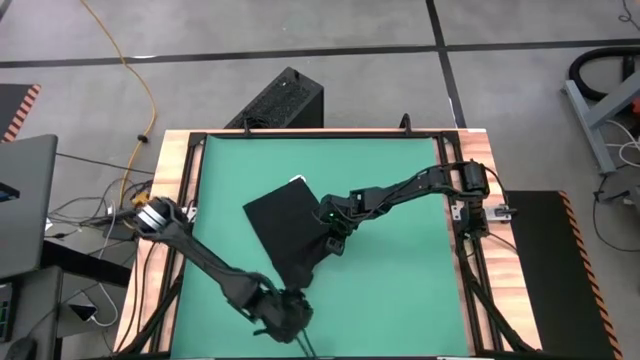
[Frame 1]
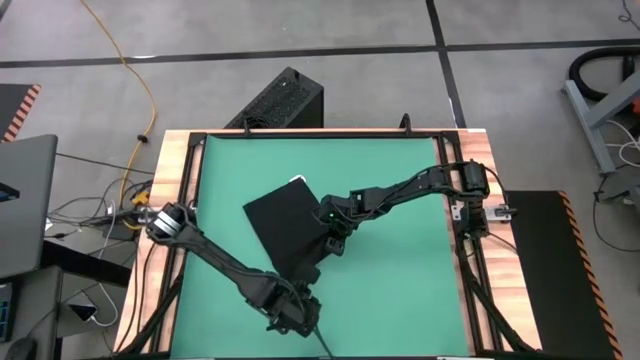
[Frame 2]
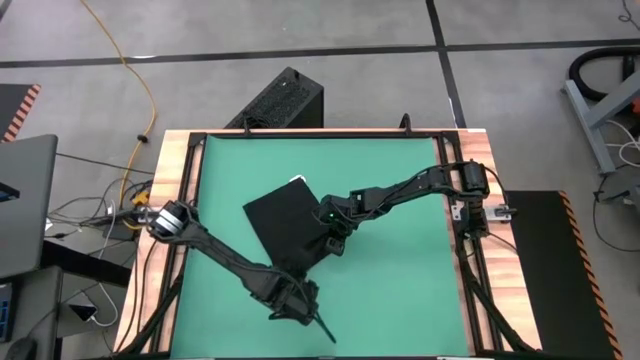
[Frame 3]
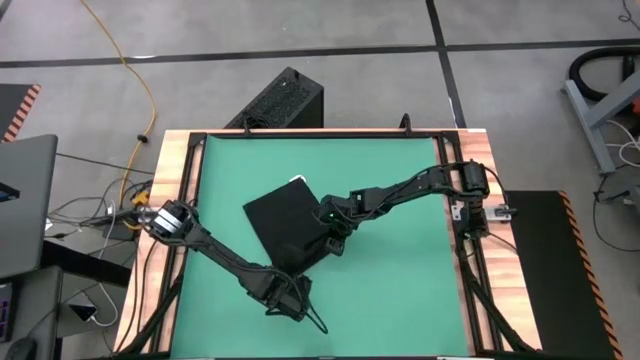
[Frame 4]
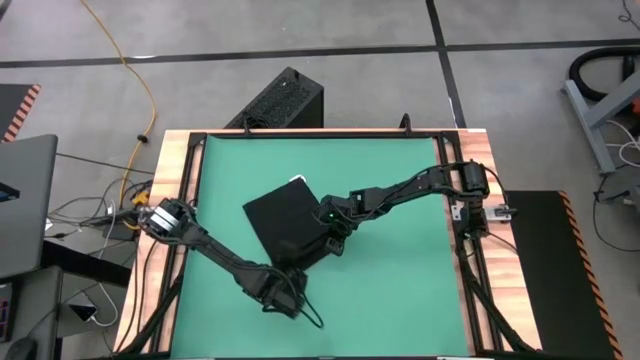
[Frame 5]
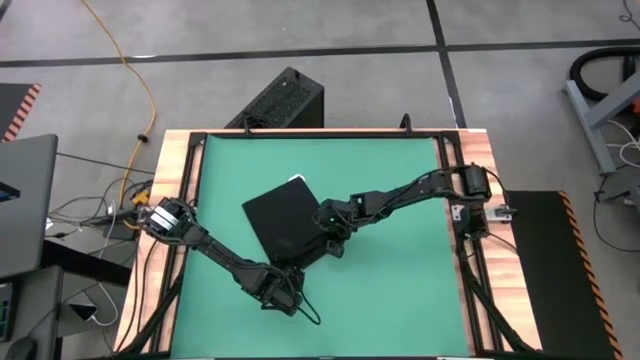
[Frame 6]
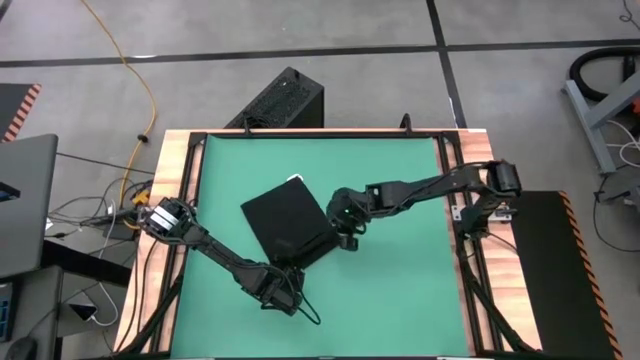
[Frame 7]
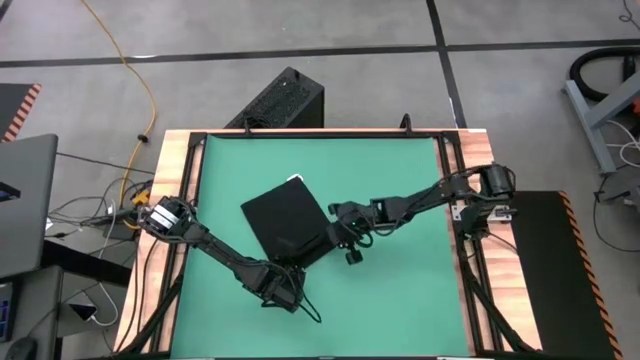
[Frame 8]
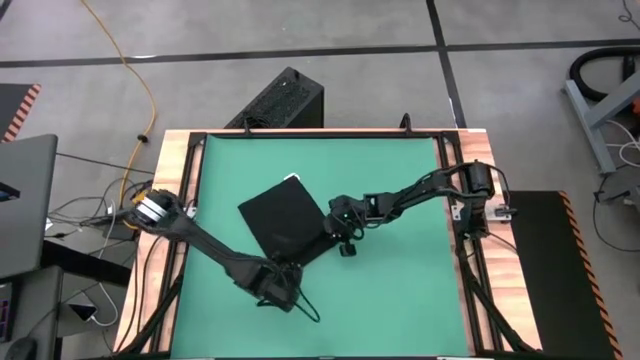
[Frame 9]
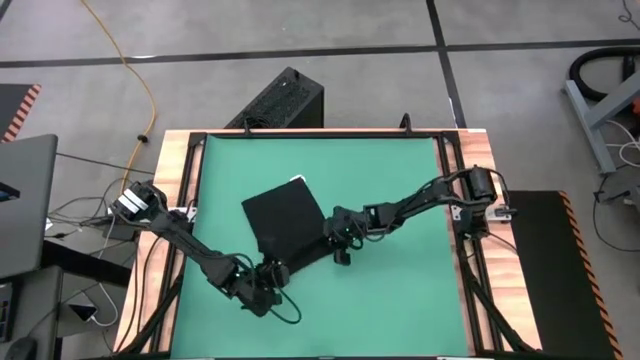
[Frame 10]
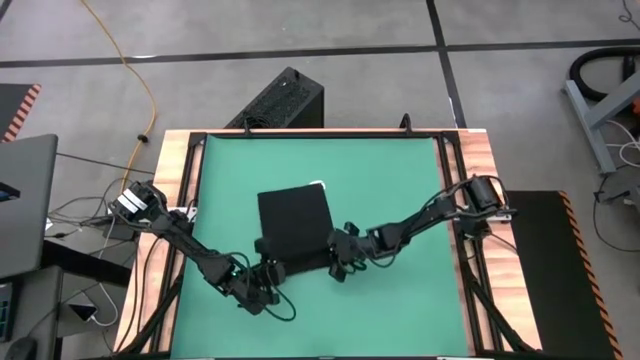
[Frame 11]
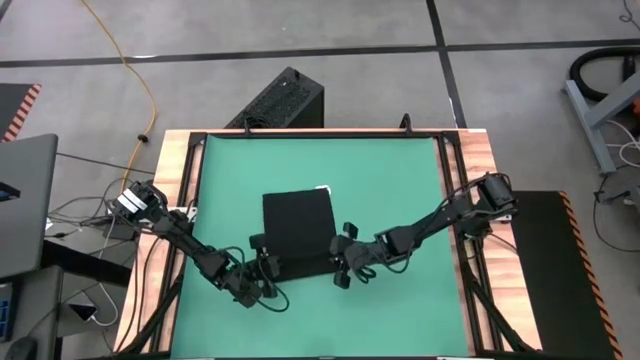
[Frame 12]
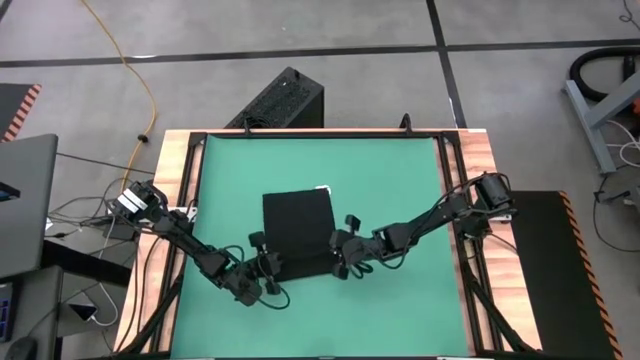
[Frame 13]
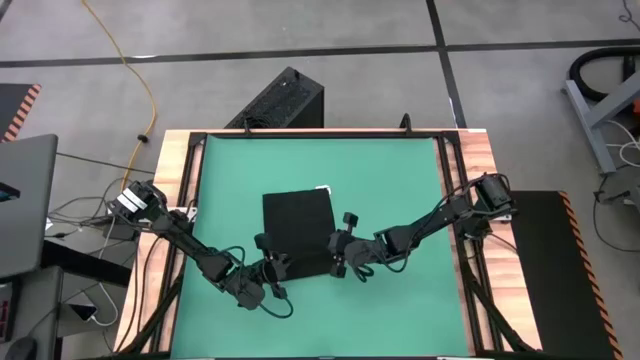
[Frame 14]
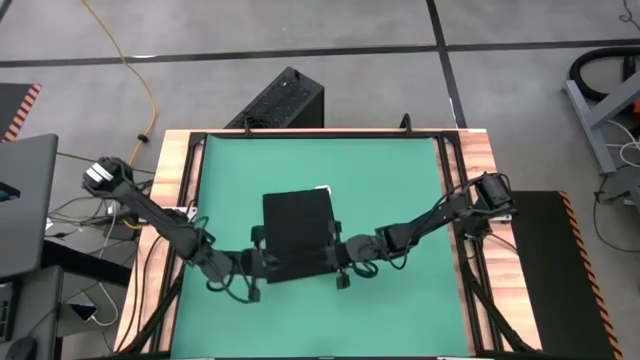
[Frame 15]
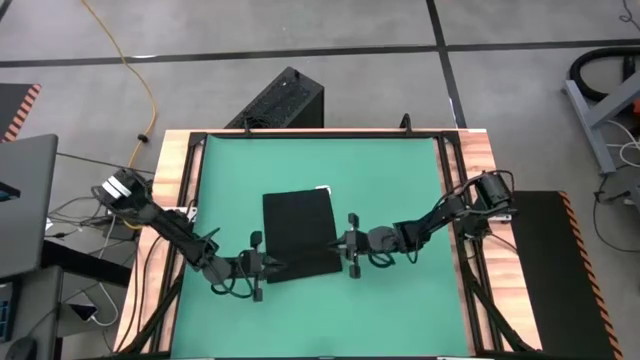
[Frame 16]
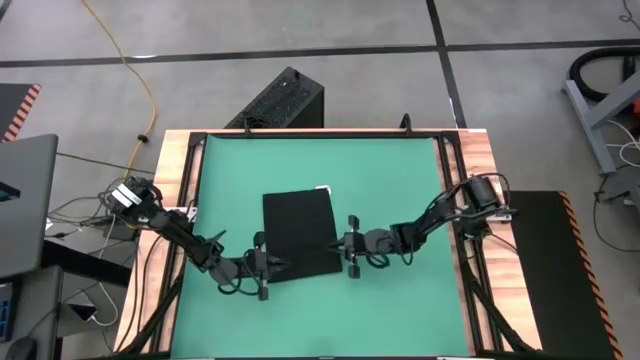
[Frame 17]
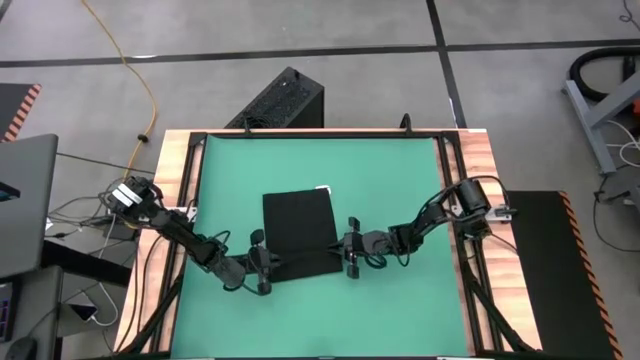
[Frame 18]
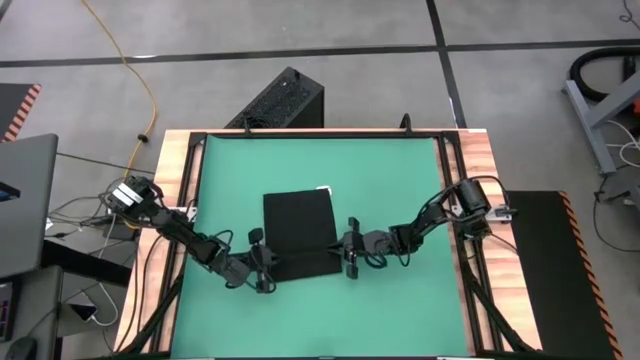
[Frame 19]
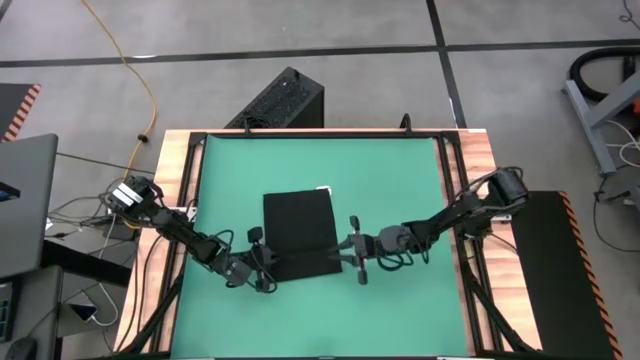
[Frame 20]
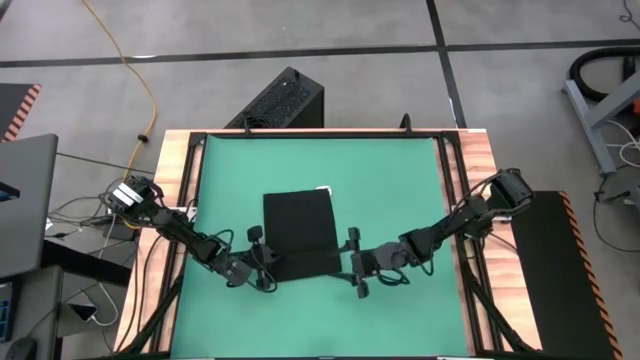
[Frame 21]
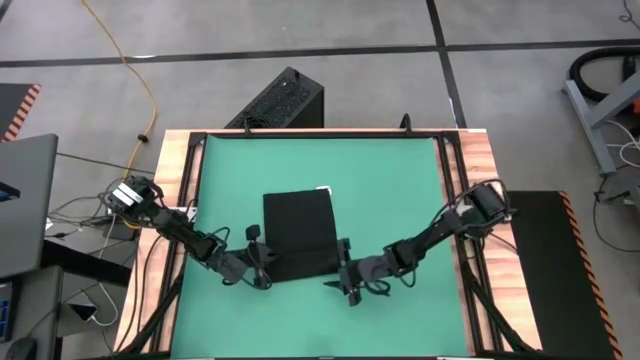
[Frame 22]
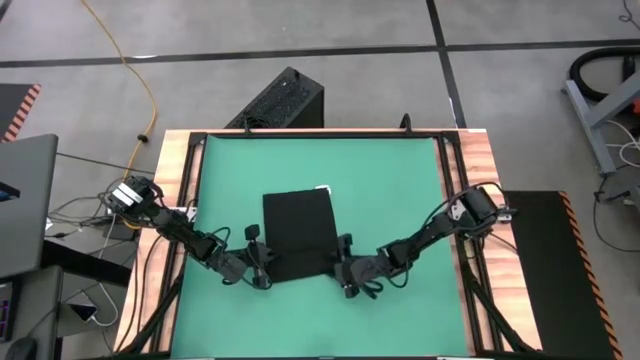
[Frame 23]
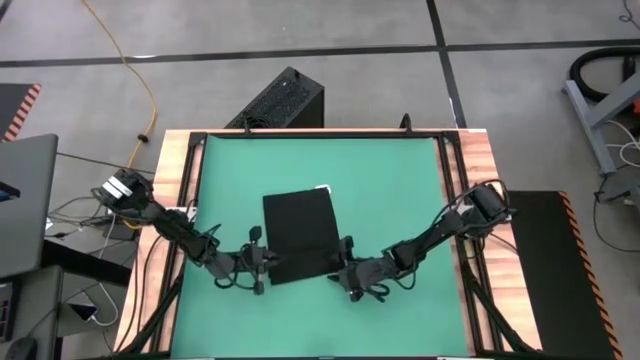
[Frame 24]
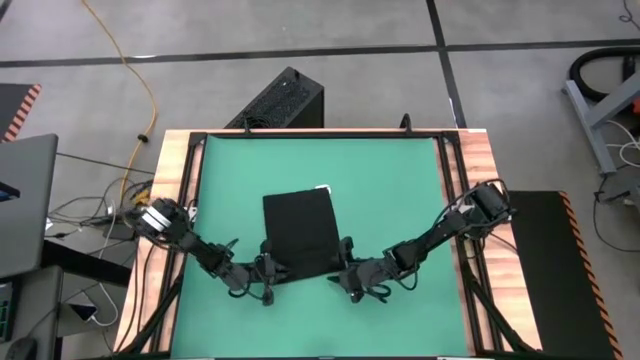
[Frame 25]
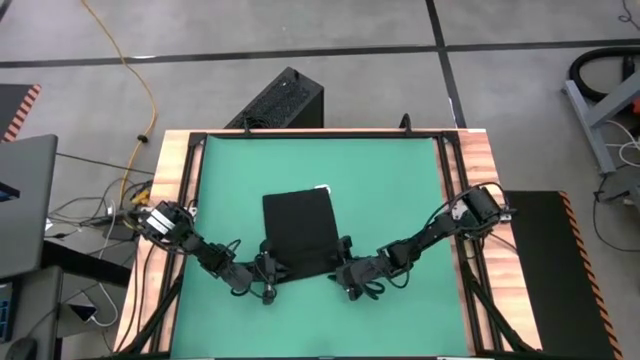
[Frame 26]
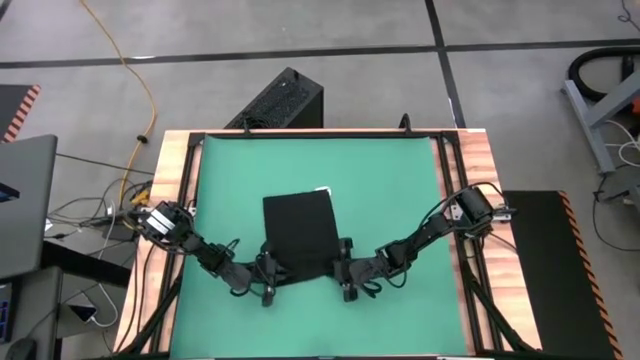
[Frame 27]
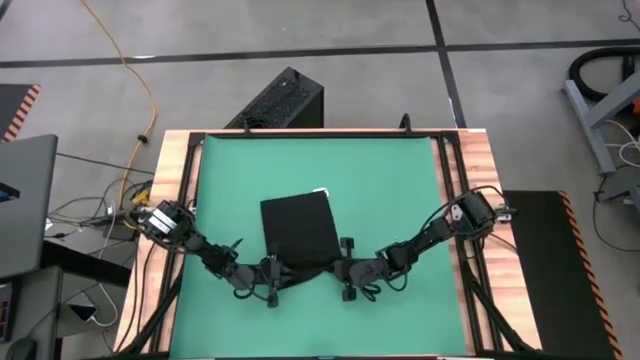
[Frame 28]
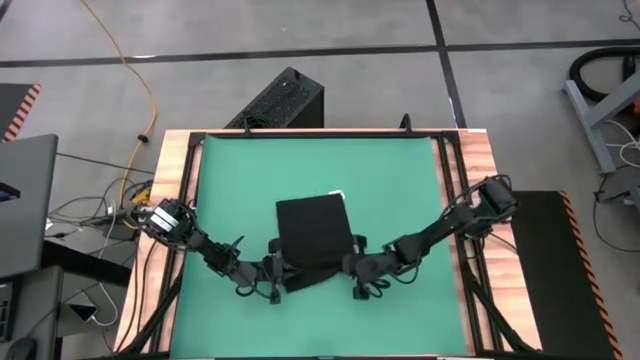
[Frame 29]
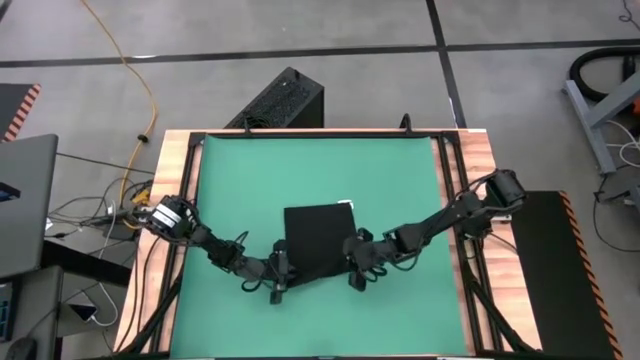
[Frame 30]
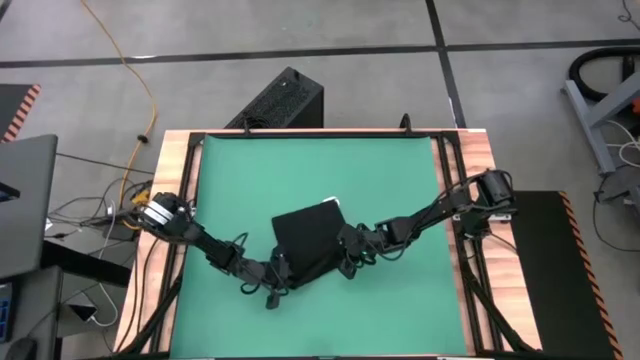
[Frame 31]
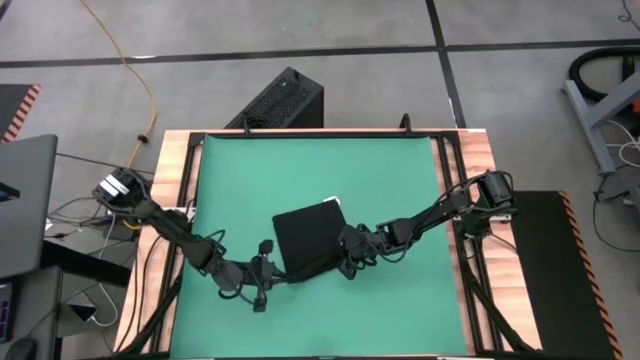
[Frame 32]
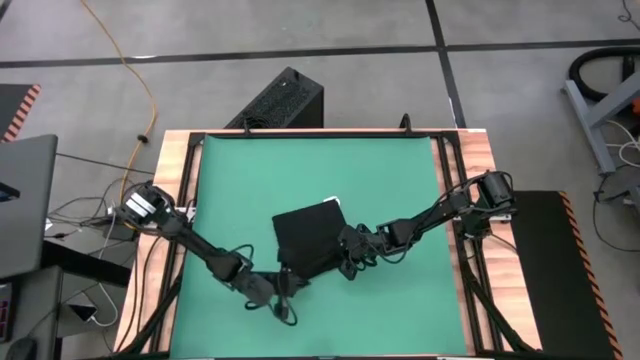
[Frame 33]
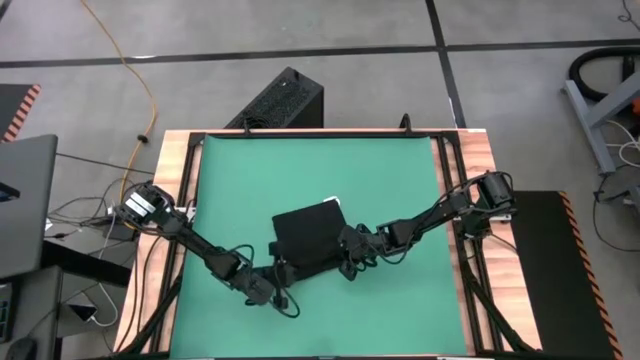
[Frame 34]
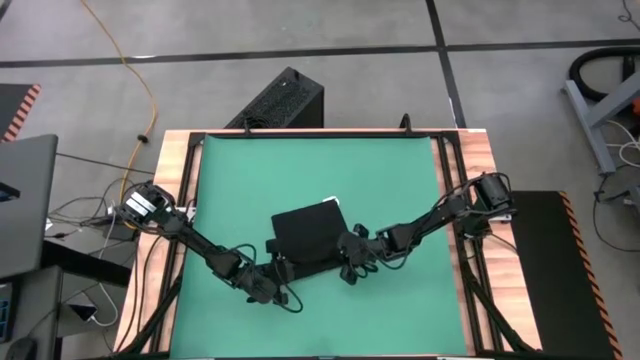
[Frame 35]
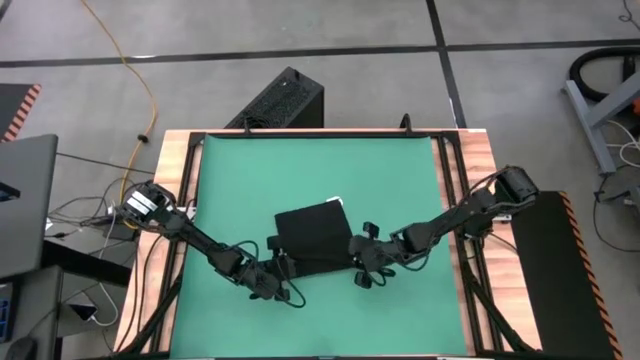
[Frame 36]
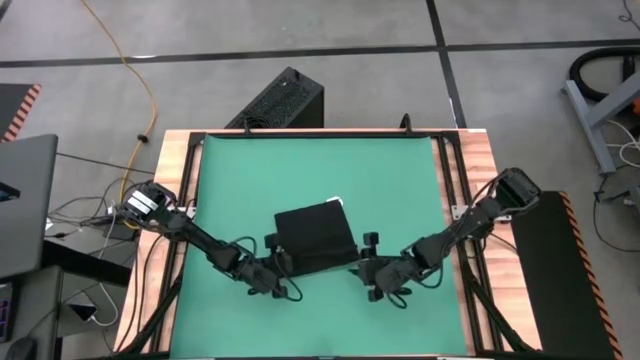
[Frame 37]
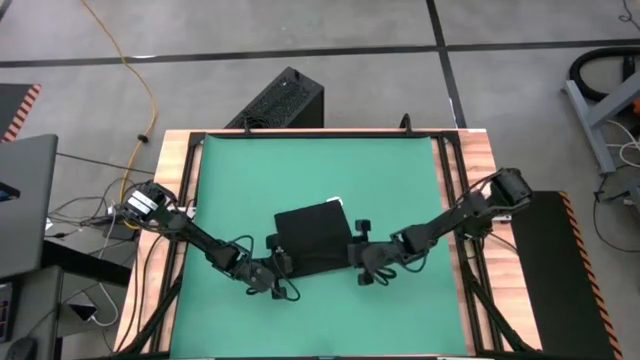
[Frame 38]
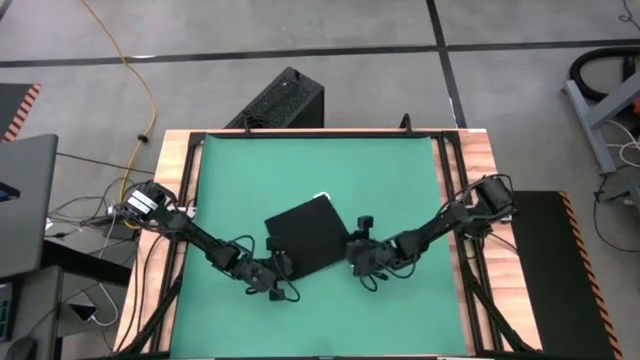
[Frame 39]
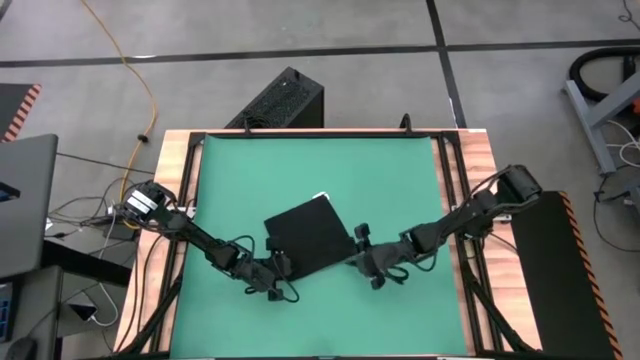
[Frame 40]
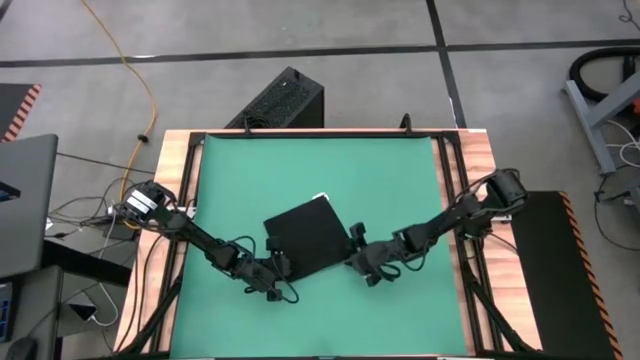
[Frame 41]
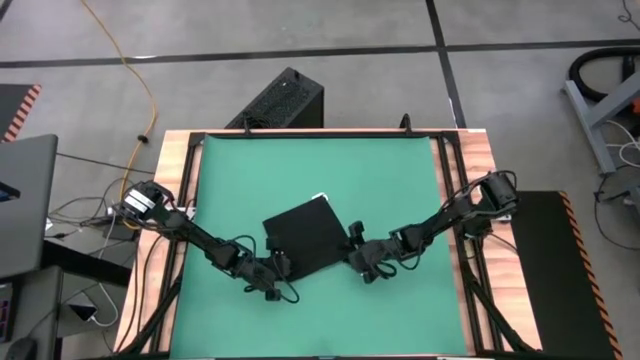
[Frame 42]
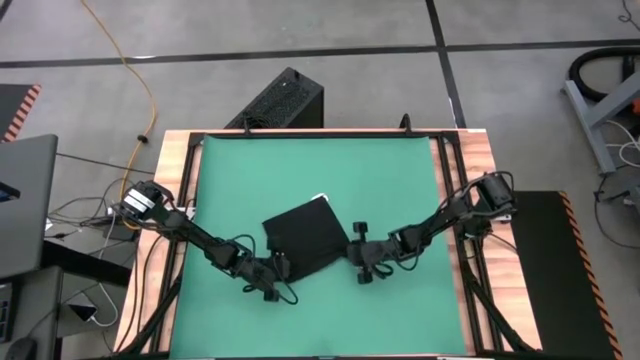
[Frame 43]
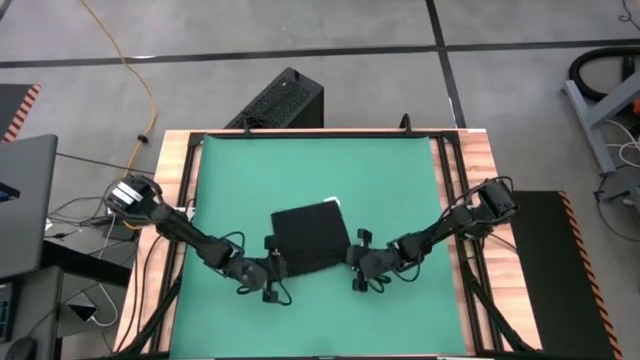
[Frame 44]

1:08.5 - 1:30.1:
Task: Roll towel into tight, uniform cylinder
Roll the black towel
